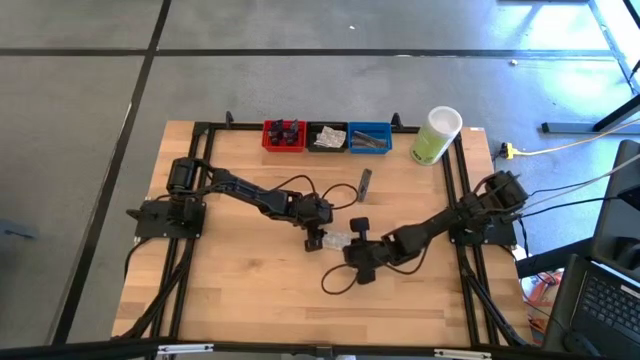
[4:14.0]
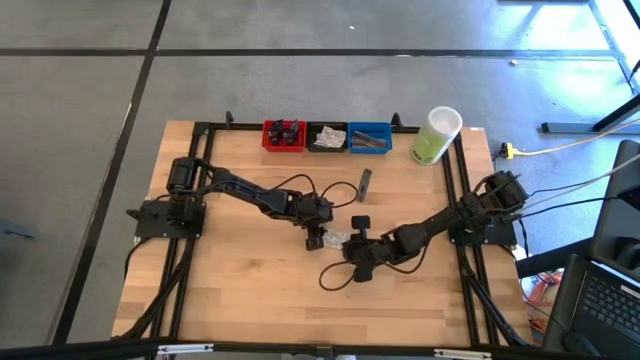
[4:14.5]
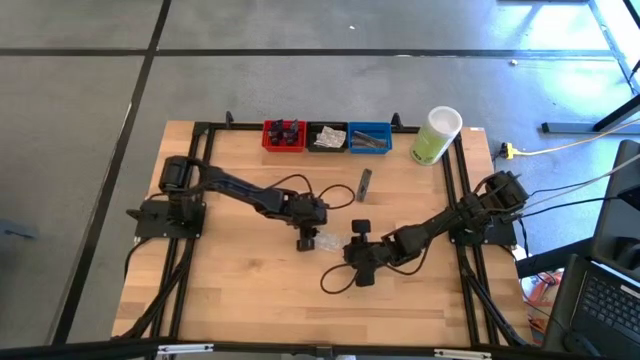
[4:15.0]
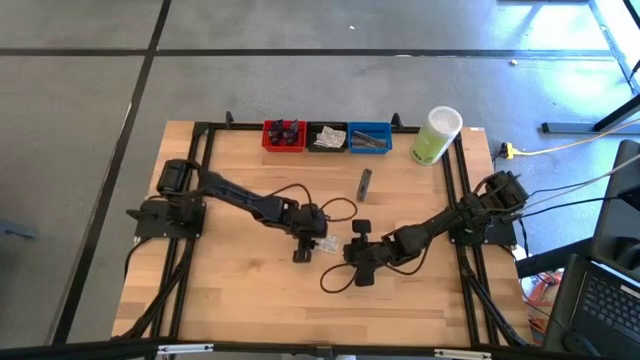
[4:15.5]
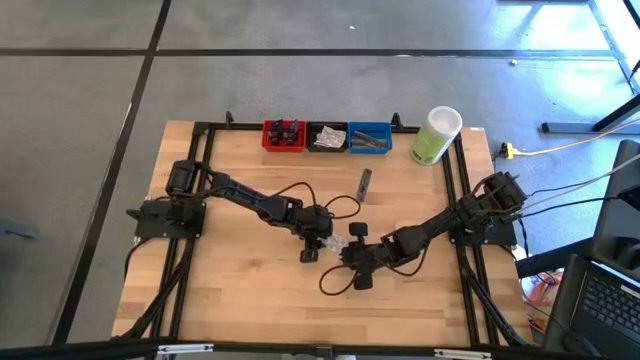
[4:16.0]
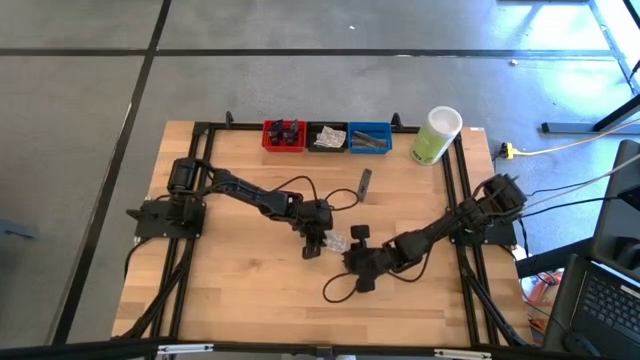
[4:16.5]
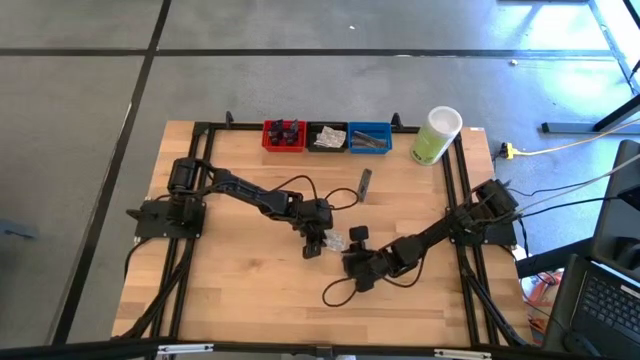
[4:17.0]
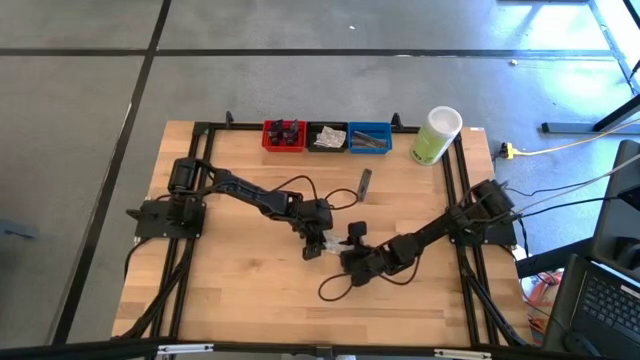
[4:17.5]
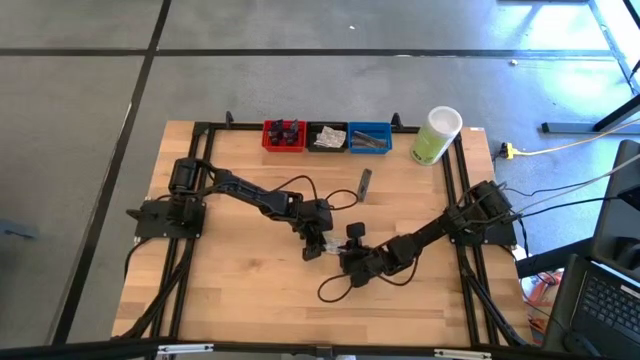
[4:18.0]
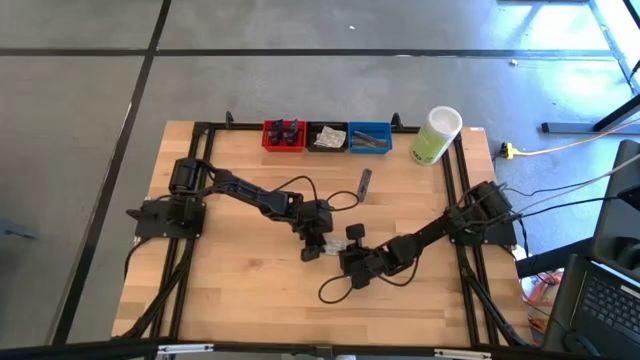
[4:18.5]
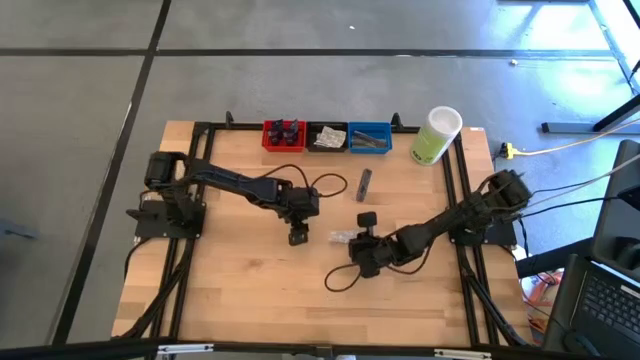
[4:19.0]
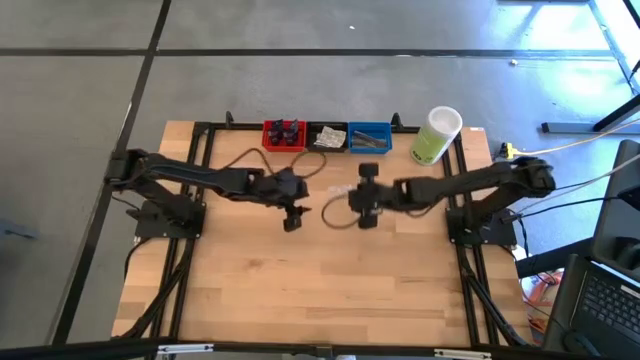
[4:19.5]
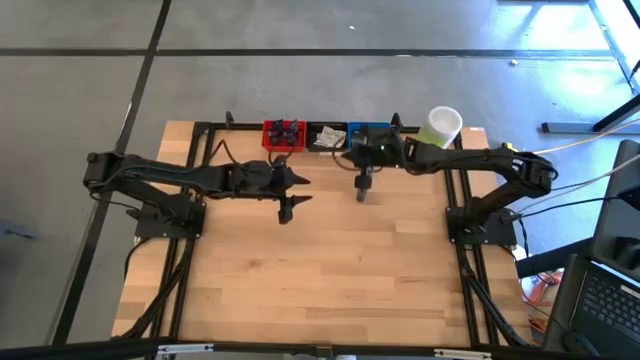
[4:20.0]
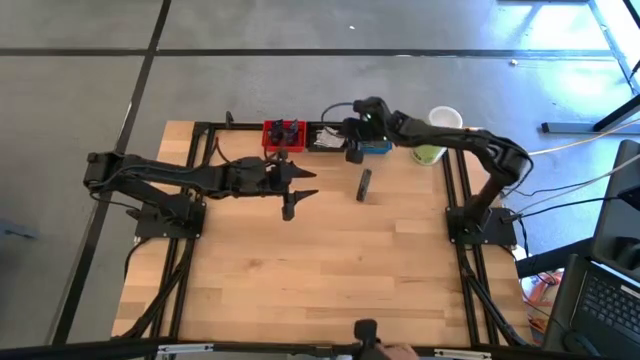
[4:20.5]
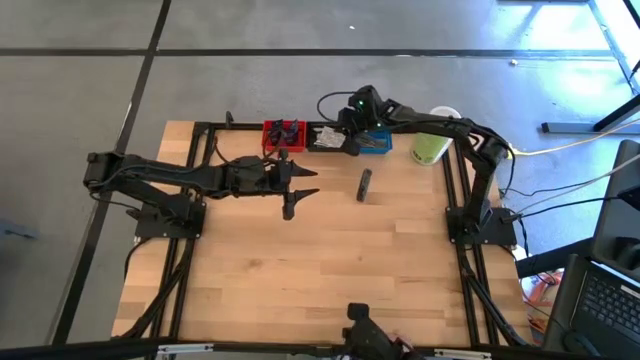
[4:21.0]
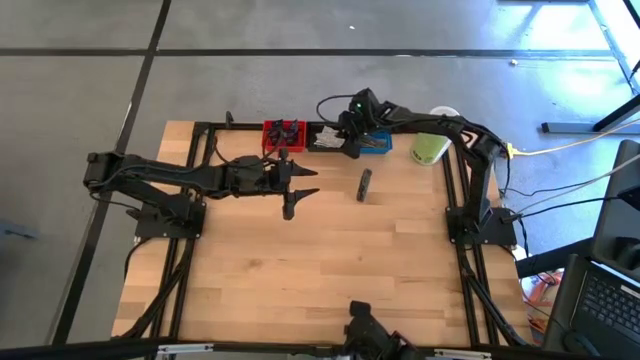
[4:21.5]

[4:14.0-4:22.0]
Task: Pick & Place Travel size toiletries
Put the white bandage pack into the black bin

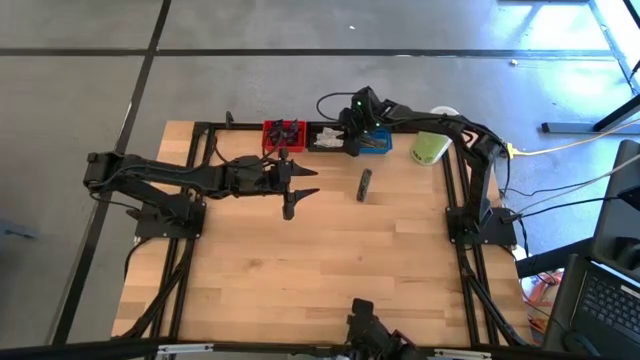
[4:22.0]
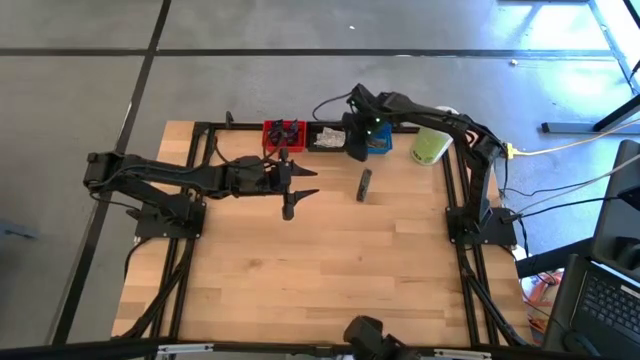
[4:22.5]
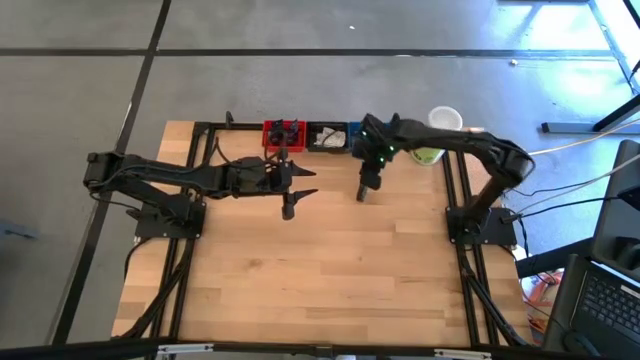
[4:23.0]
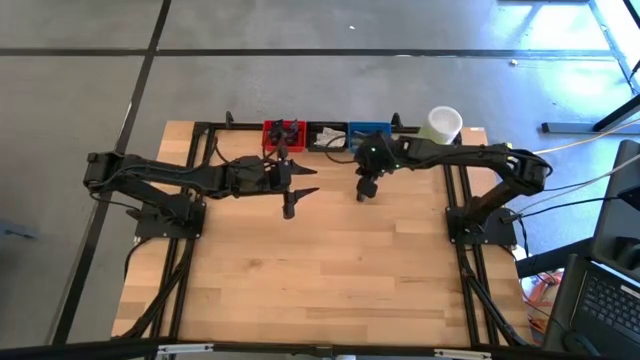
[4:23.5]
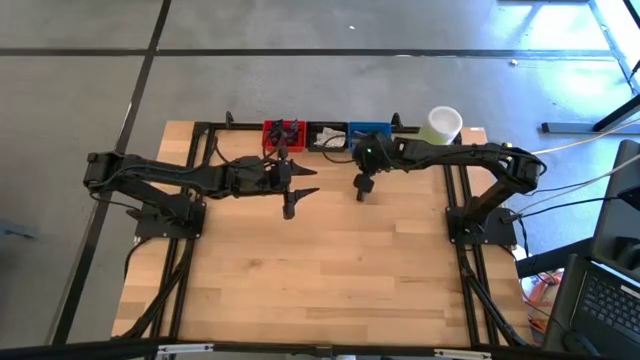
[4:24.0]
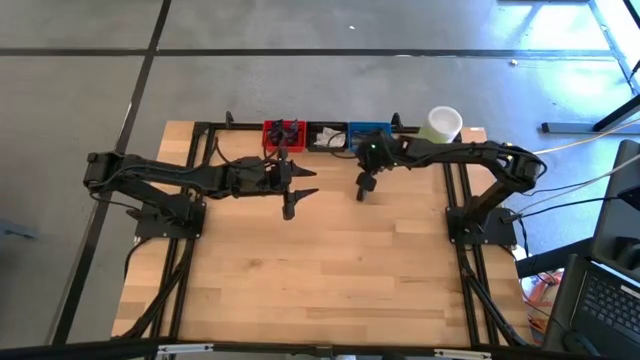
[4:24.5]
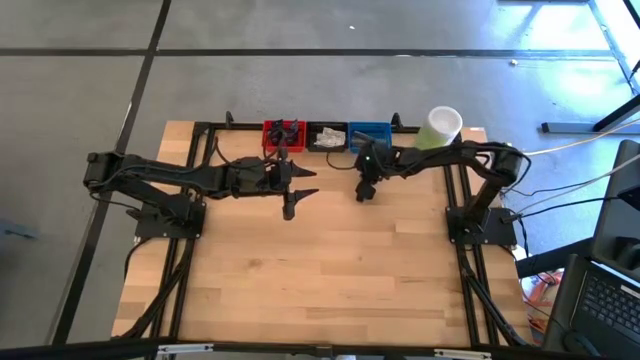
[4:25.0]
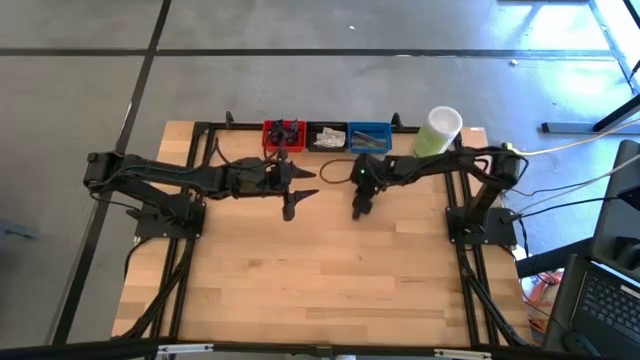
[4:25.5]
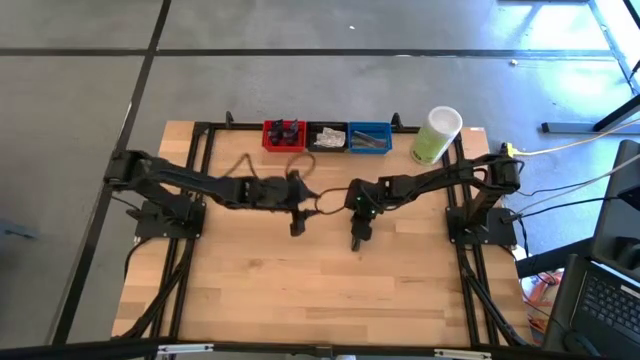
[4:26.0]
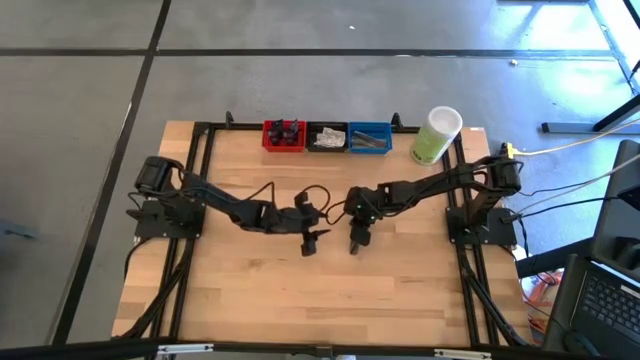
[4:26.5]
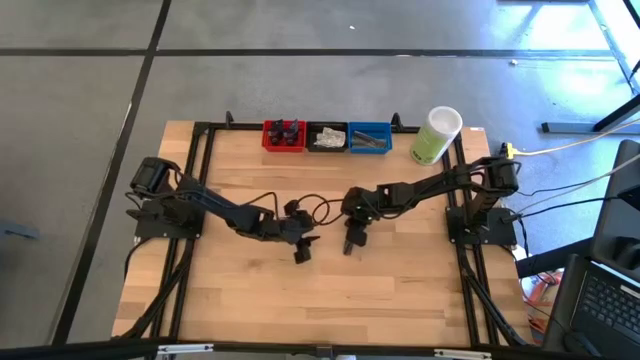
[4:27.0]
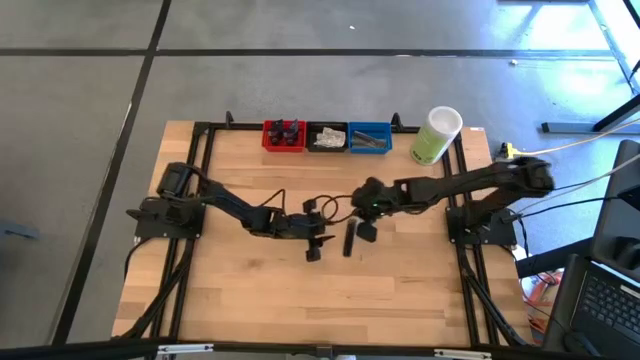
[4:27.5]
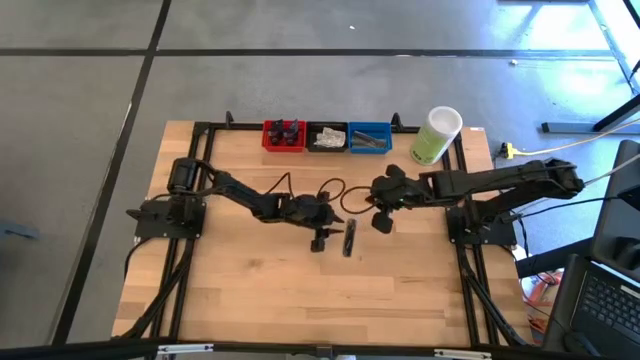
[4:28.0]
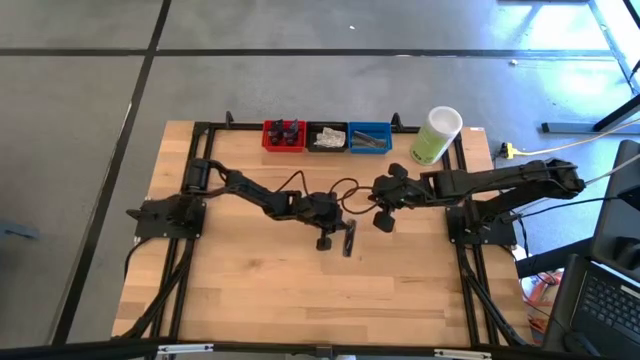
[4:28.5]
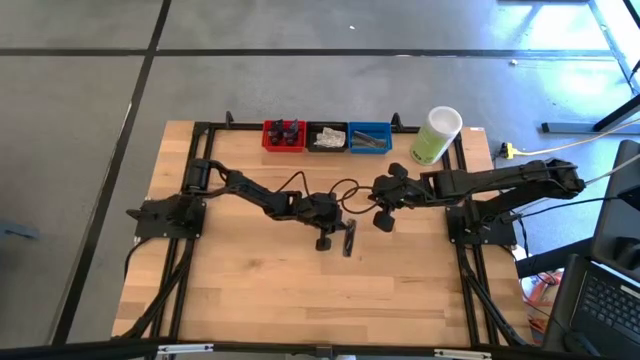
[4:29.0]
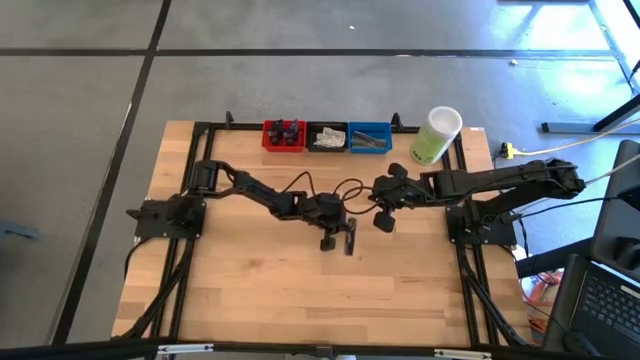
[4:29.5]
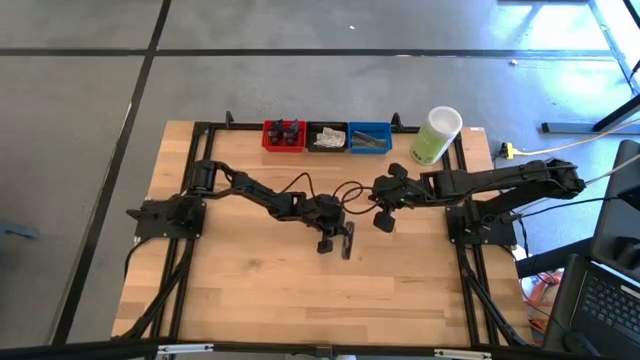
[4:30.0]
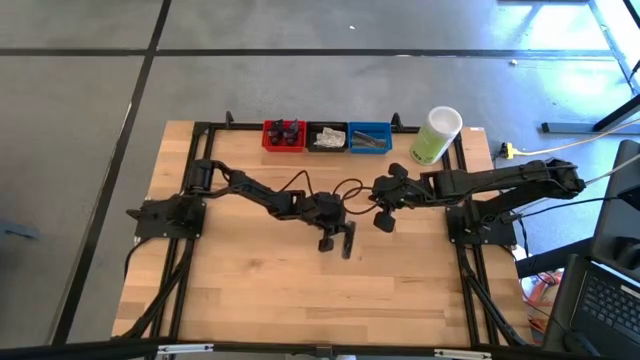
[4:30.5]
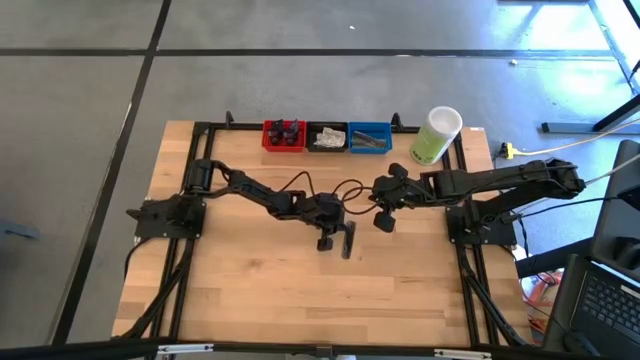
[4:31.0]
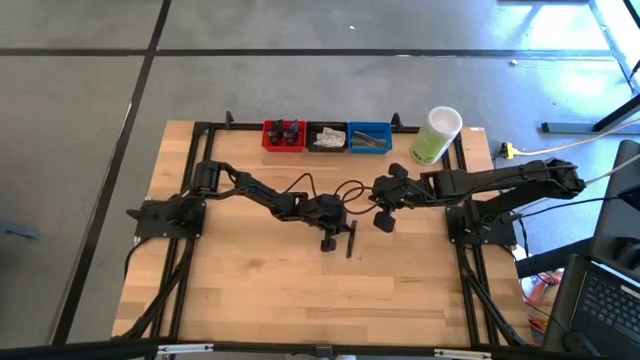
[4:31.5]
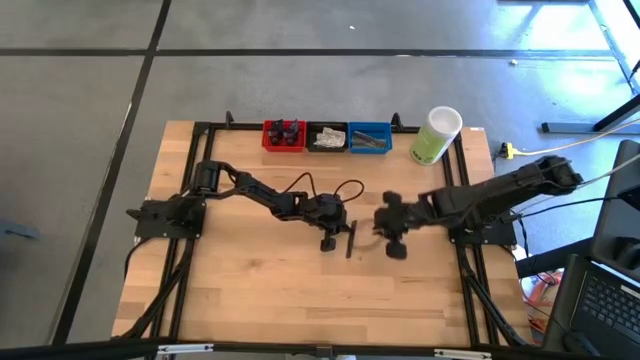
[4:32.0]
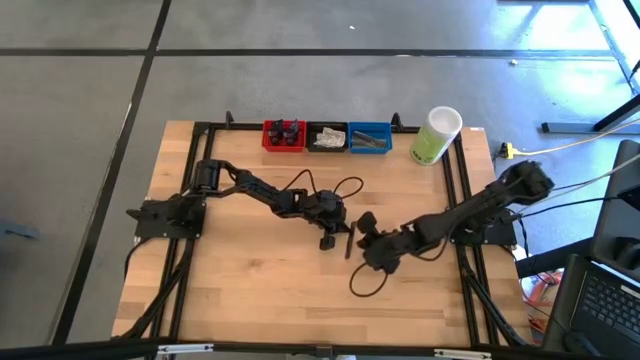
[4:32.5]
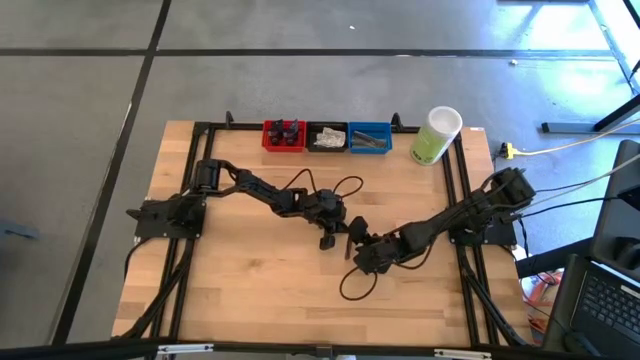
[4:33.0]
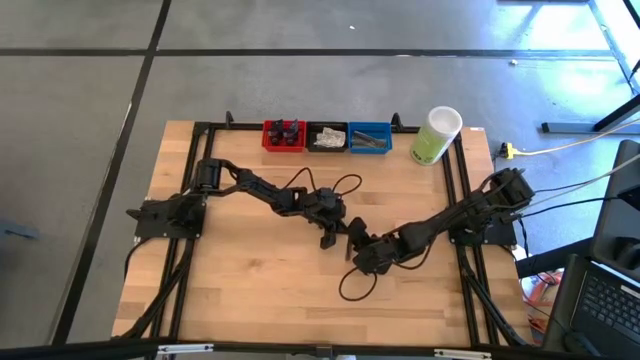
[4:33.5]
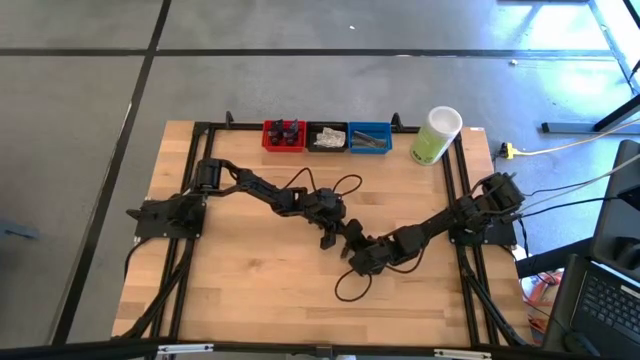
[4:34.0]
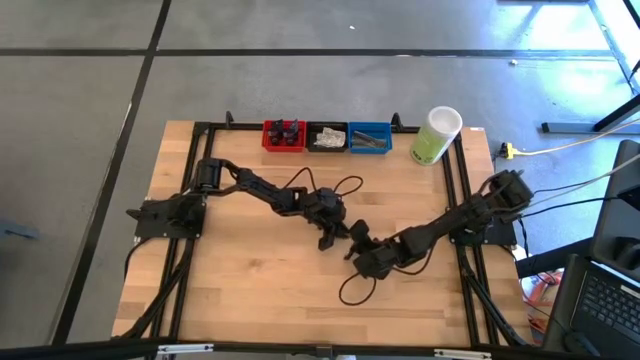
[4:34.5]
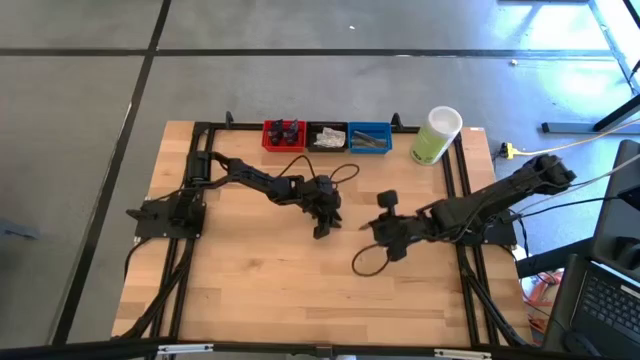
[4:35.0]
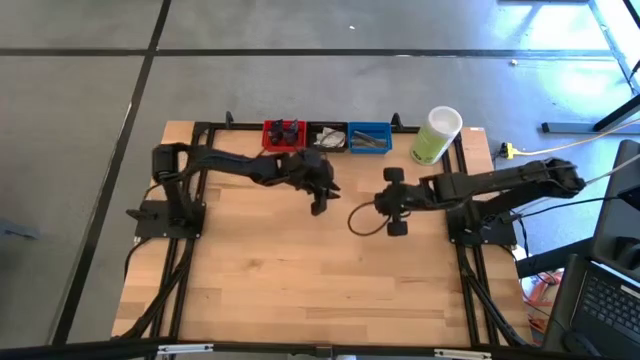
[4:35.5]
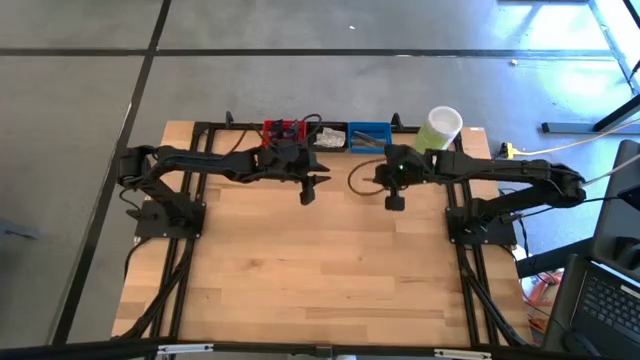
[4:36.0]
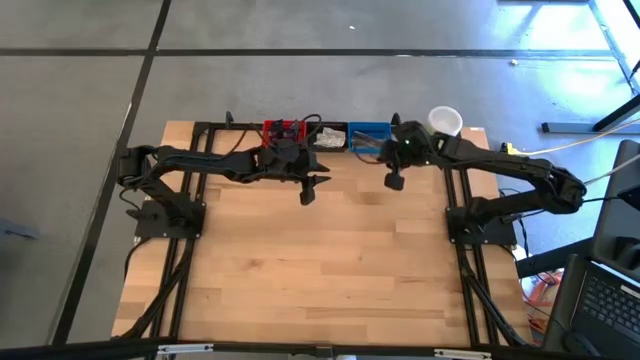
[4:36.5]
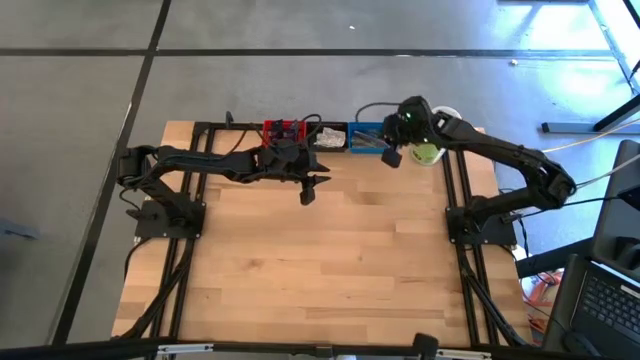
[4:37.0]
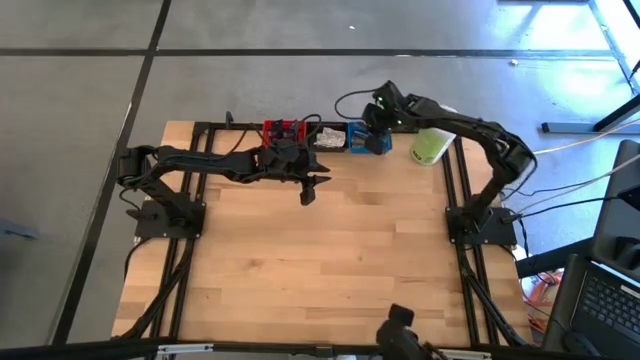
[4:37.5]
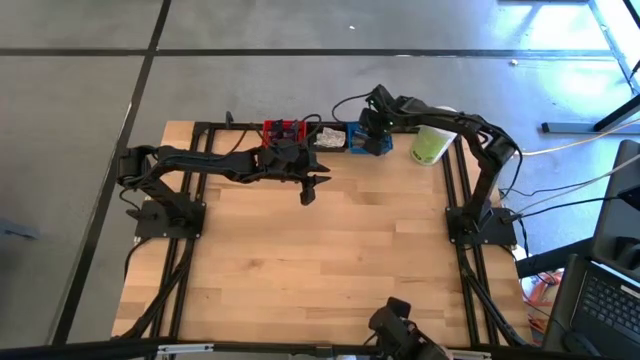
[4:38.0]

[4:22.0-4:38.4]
Put the black comb into the blue bin
